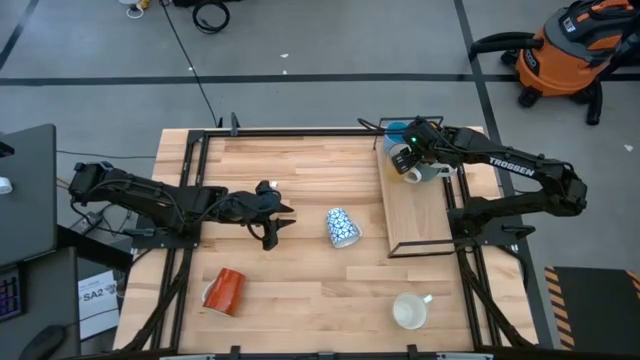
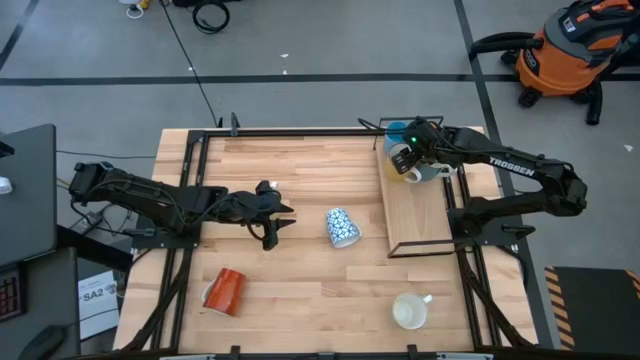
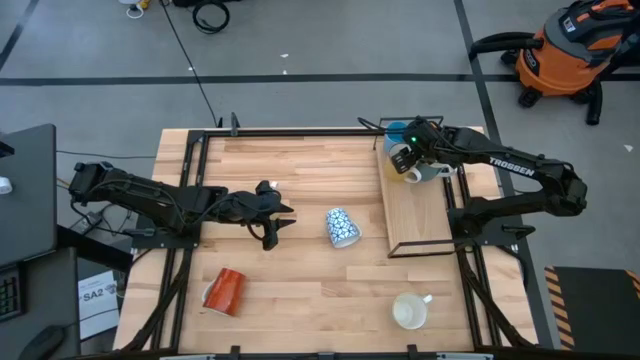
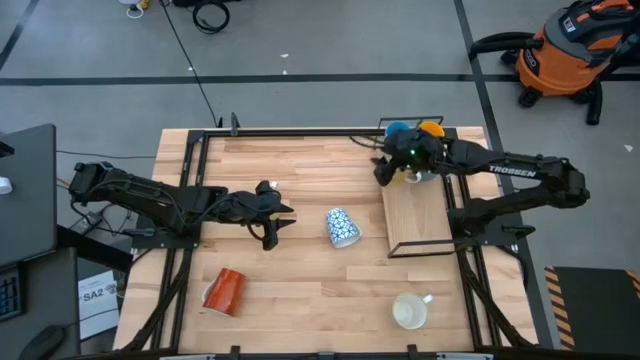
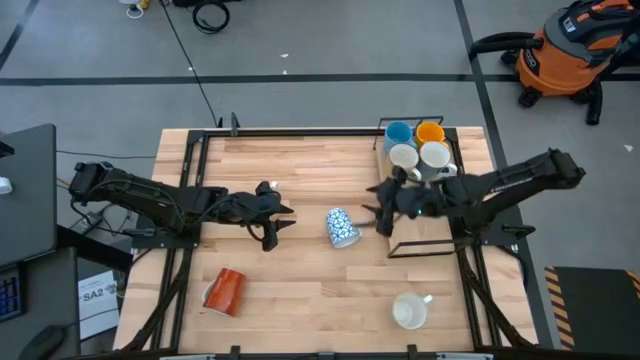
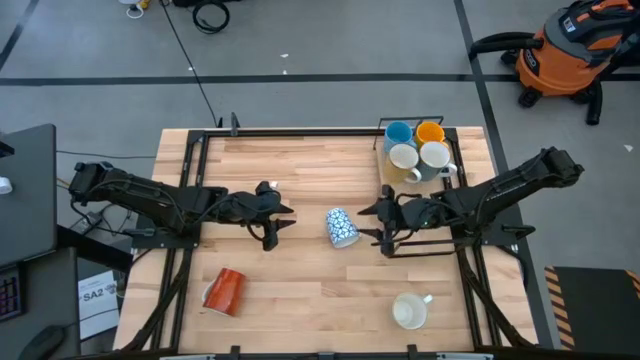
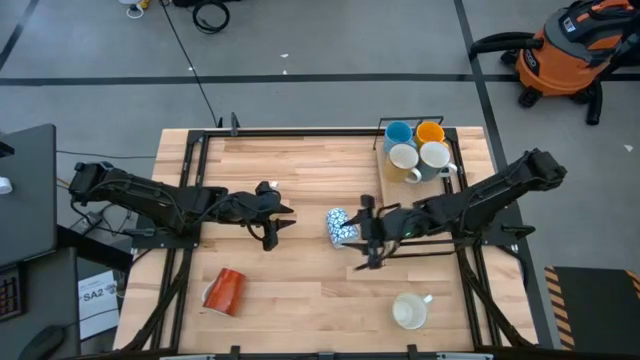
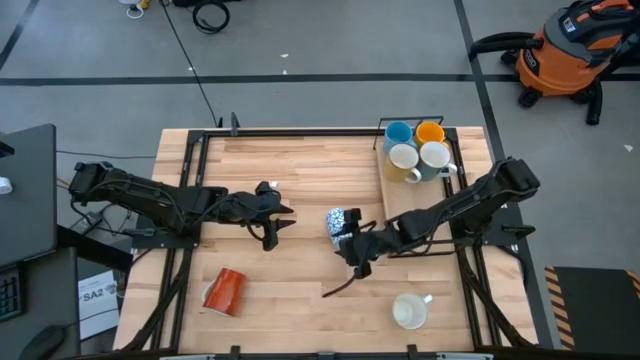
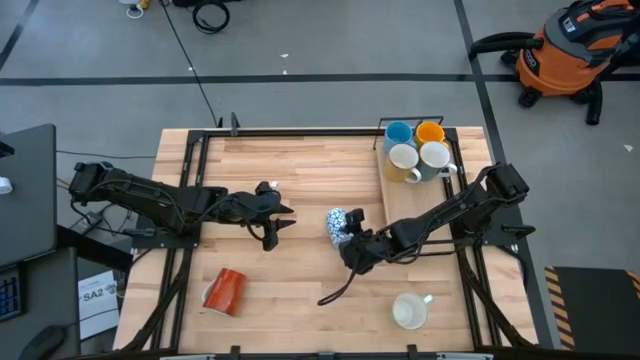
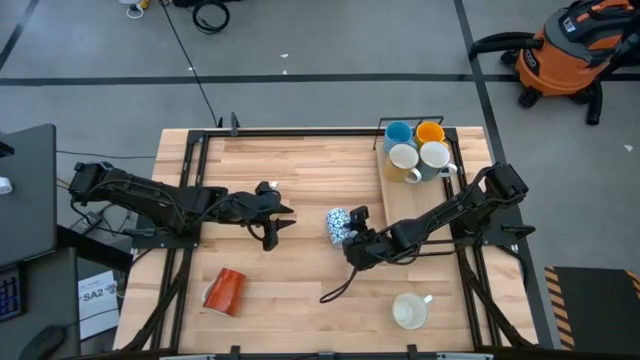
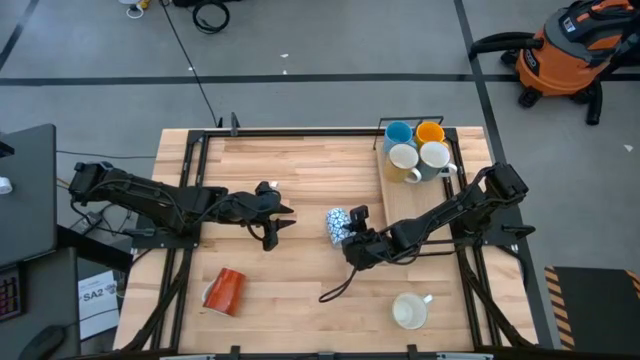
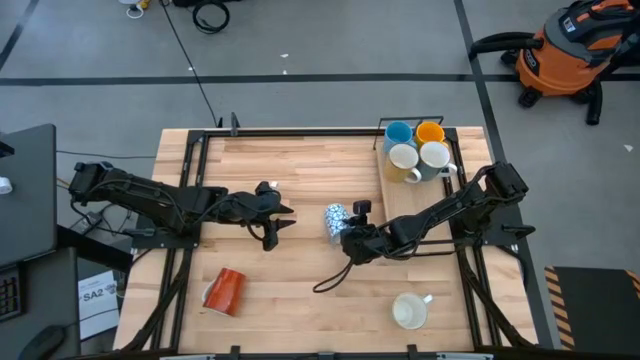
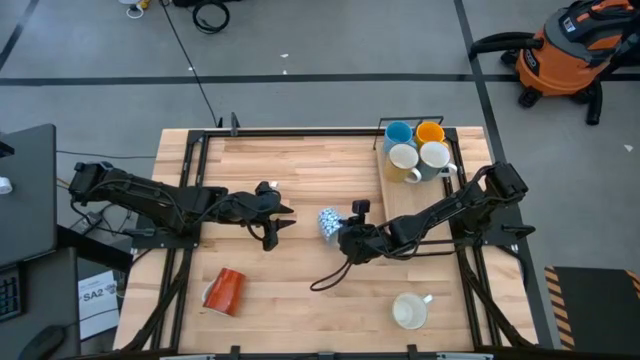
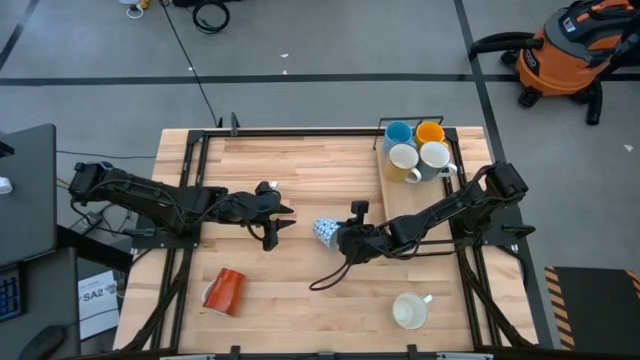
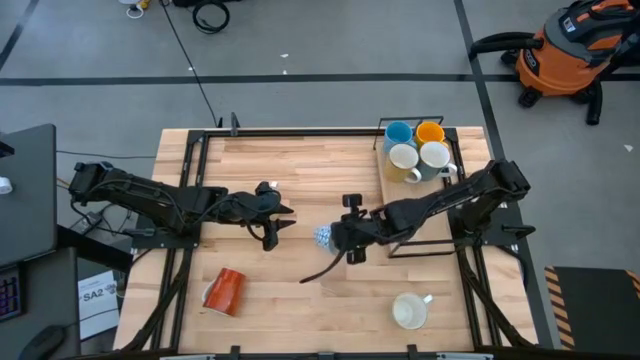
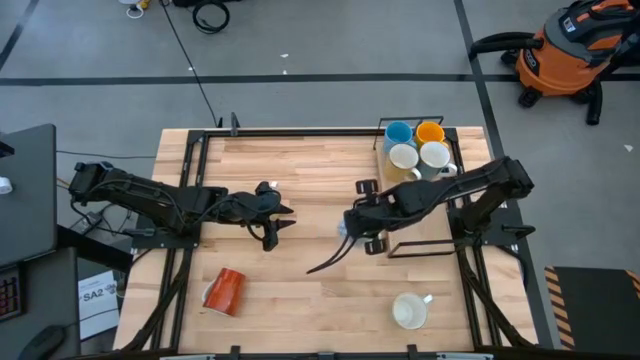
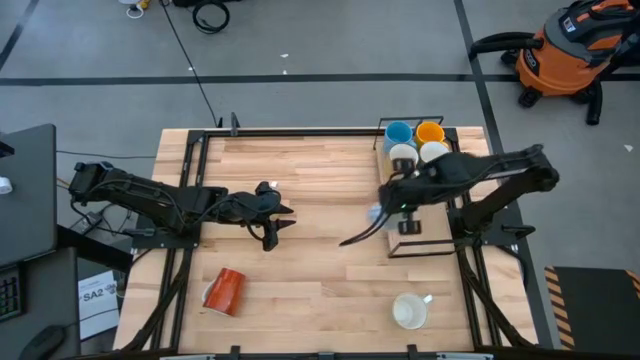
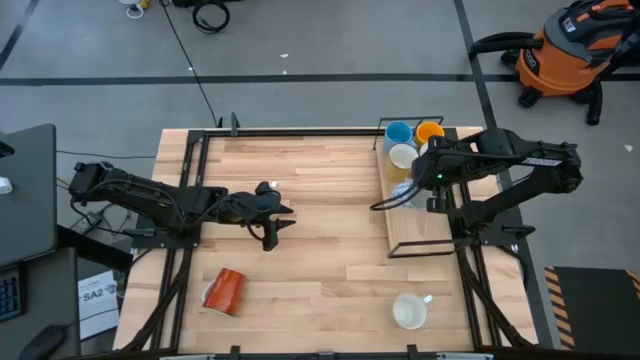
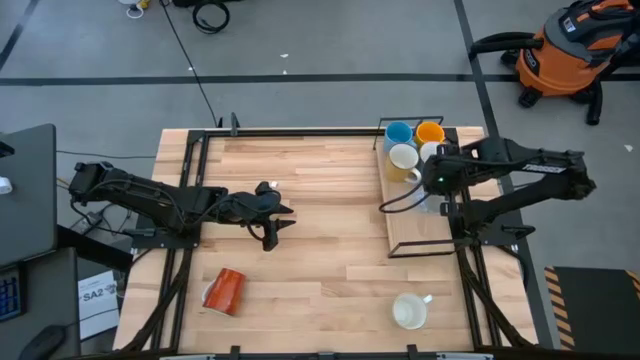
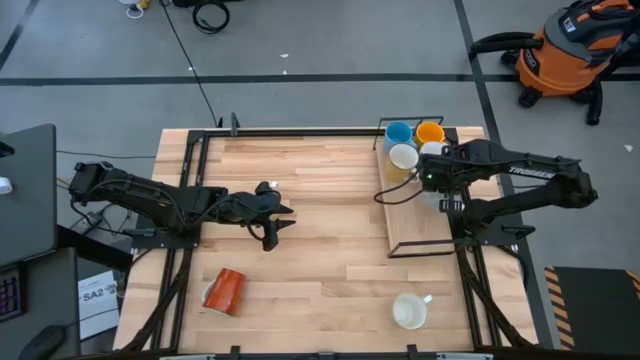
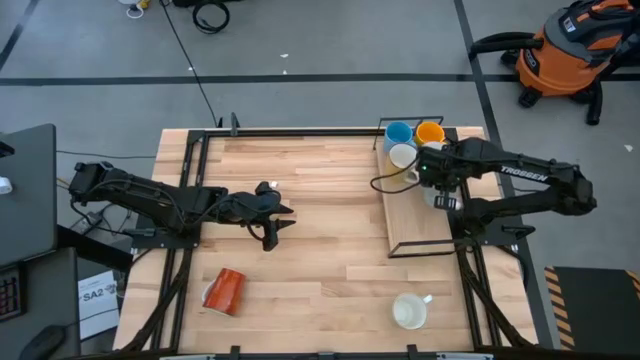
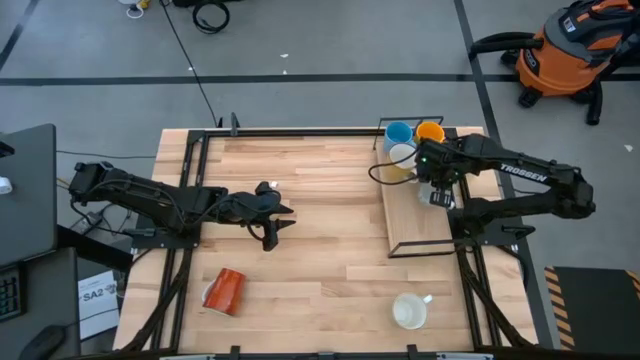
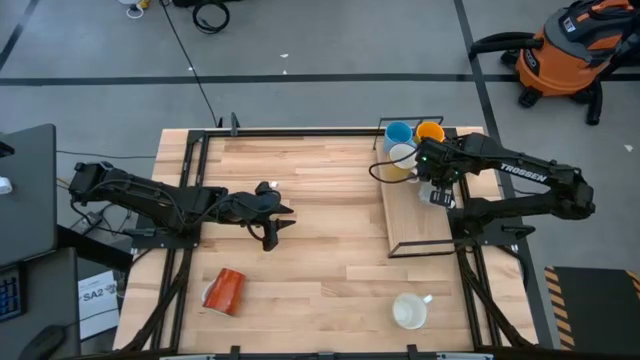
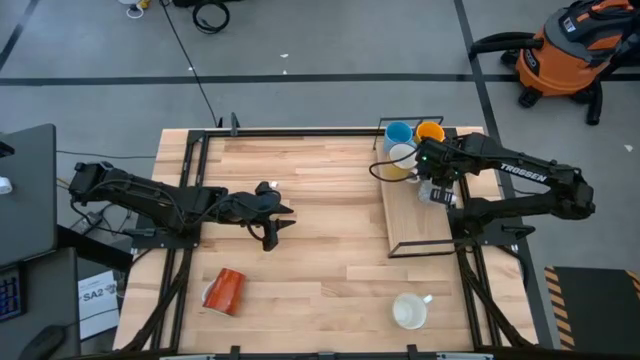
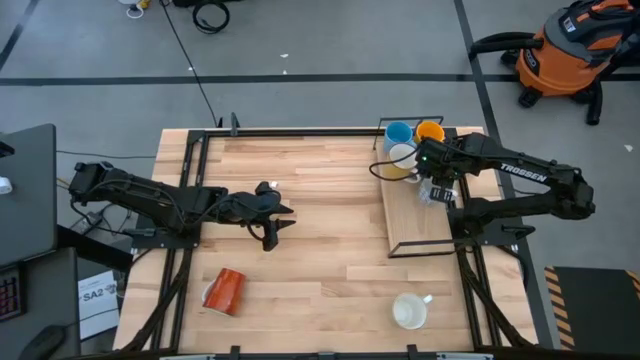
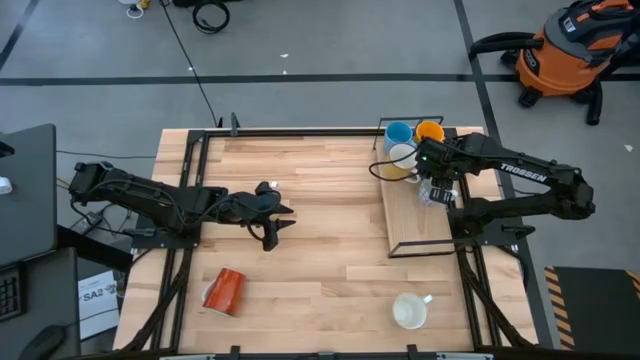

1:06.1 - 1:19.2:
Task: Place coffee mugs
Put the blue white mug on the shelf

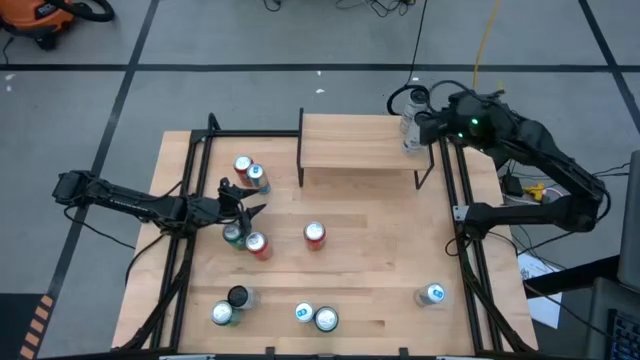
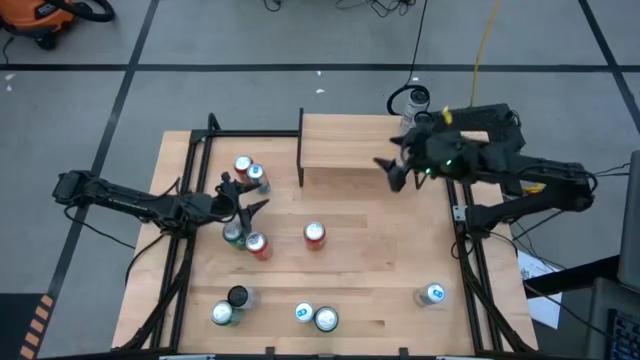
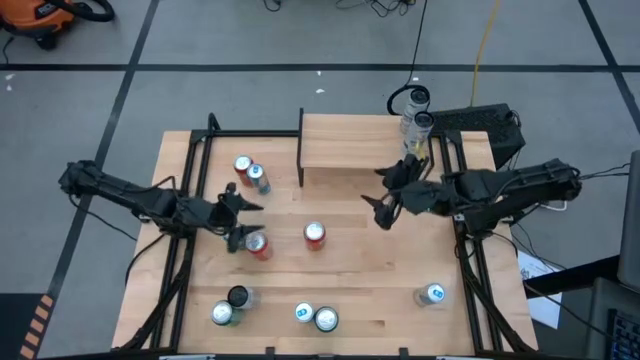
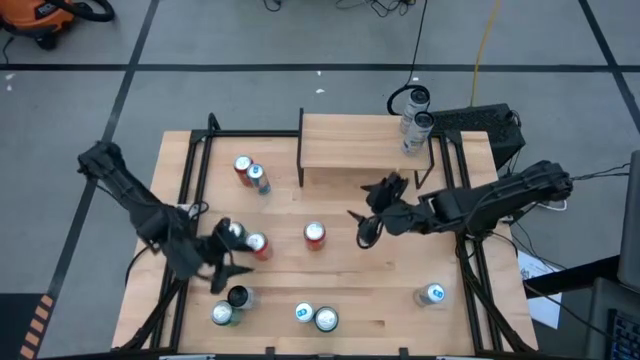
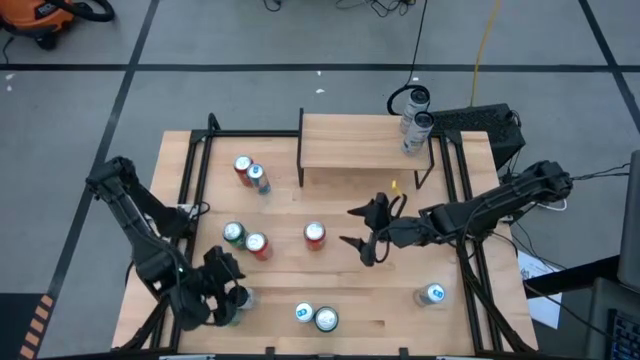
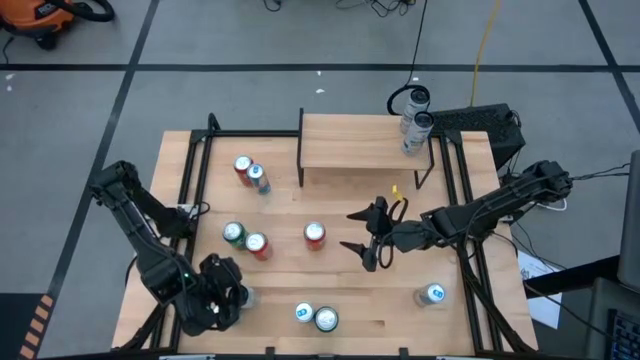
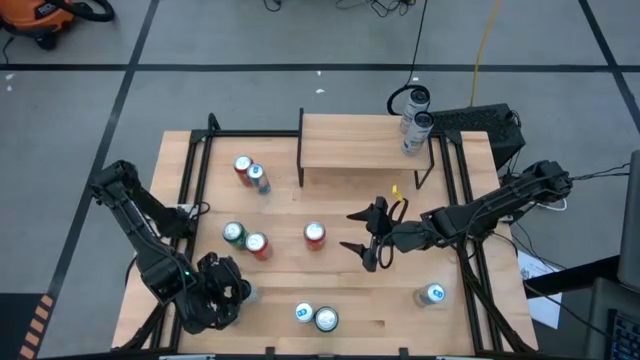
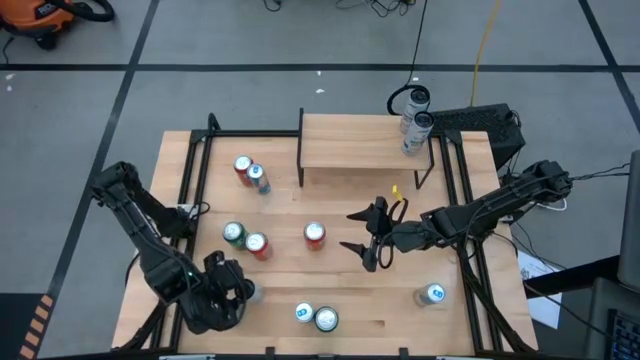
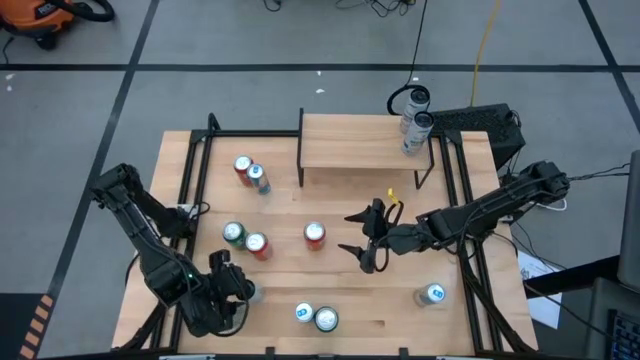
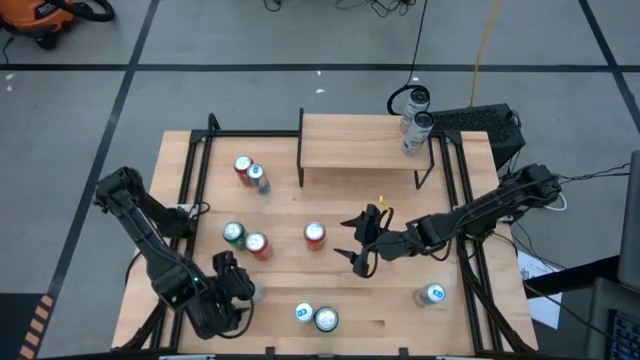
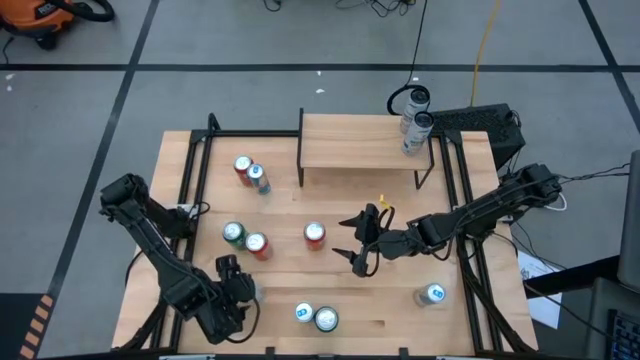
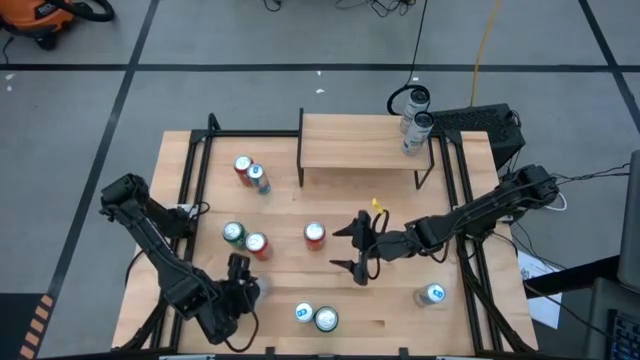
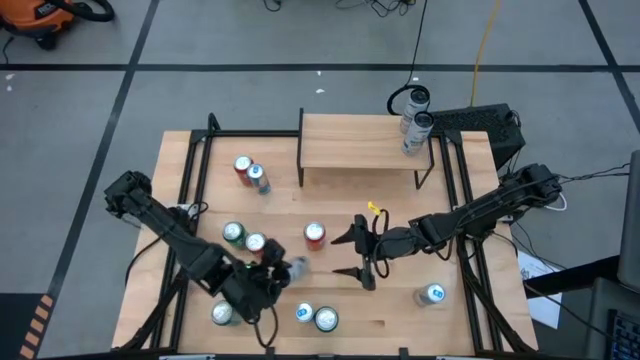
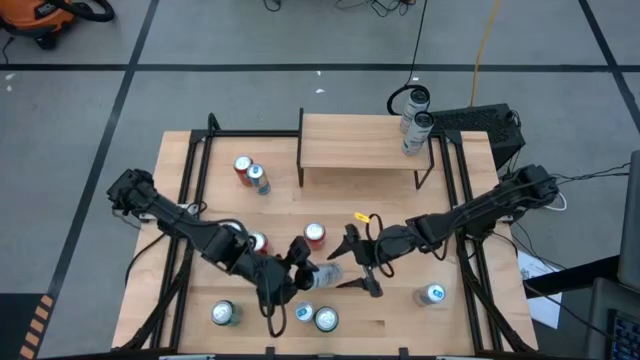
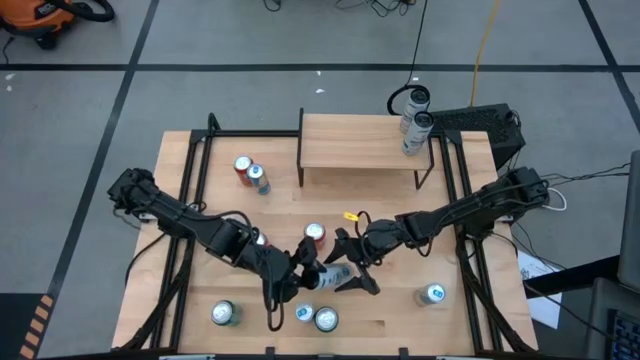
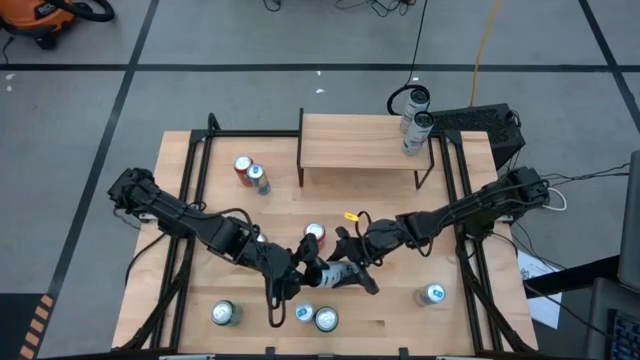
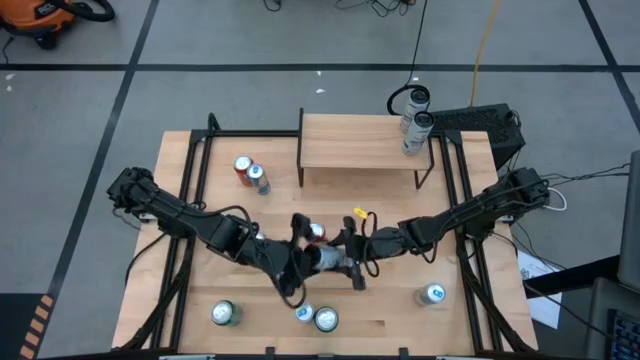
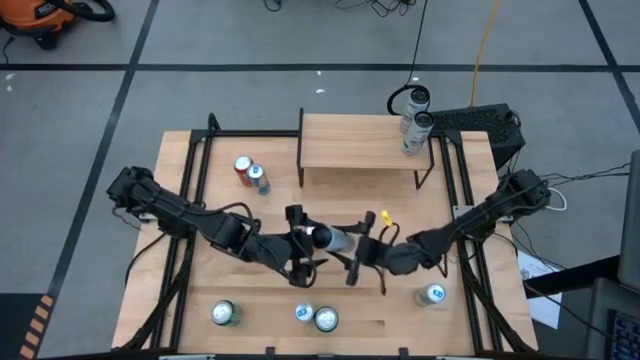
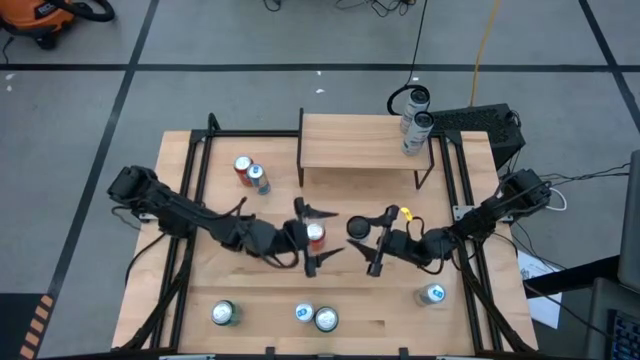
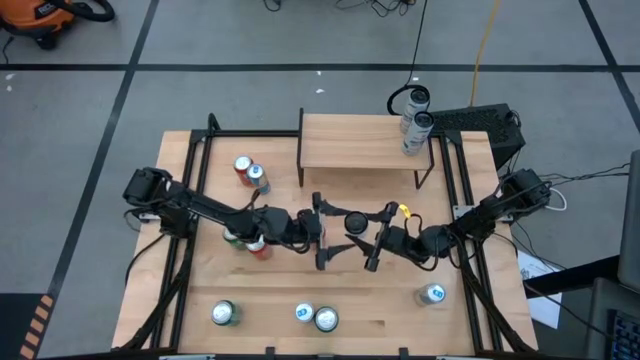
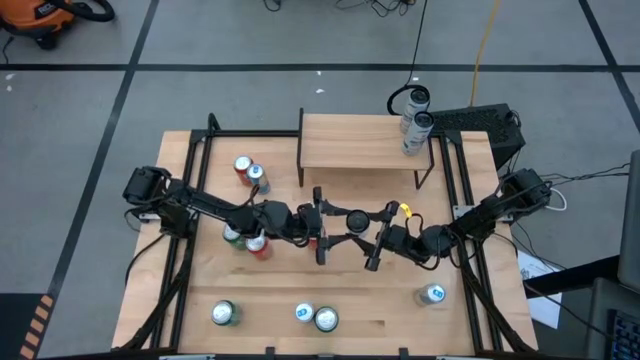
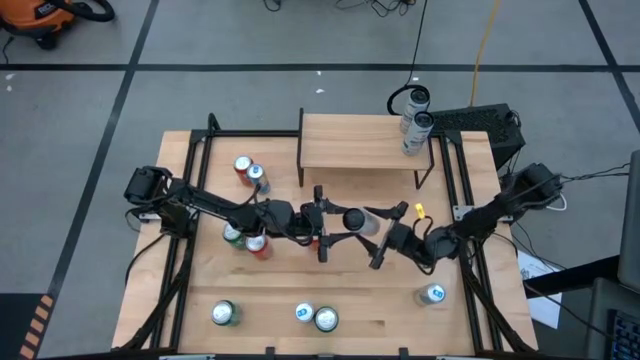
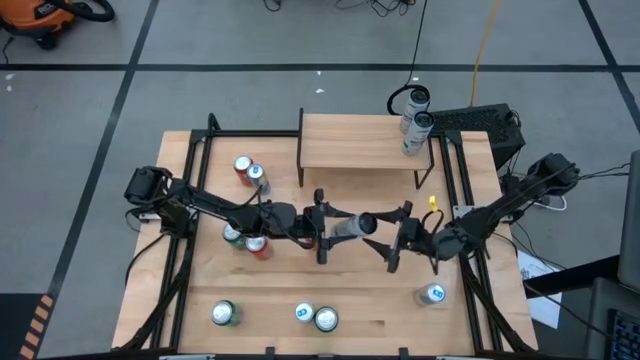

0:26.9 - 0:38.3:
Task: Place canned beverage on shelf
Put the white blue soda can on the shelf aligned with the other white blue soda can
